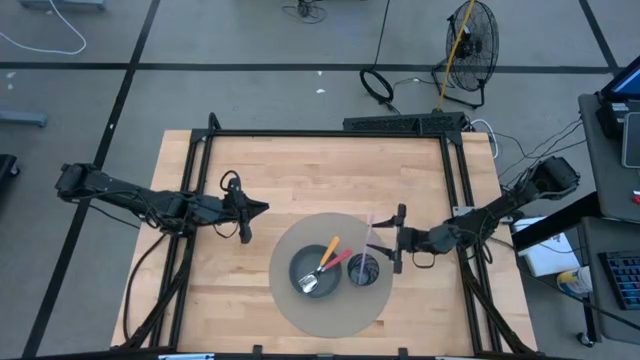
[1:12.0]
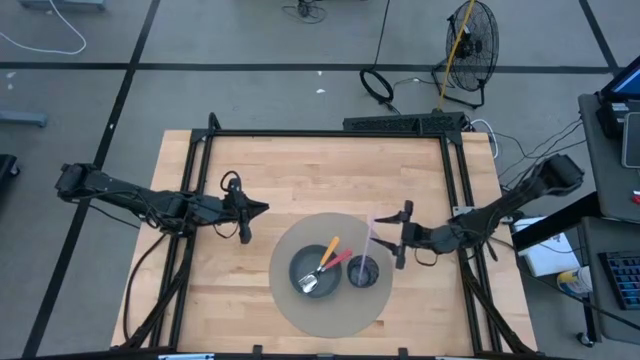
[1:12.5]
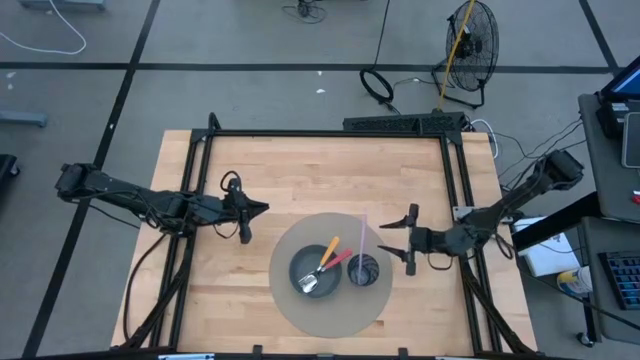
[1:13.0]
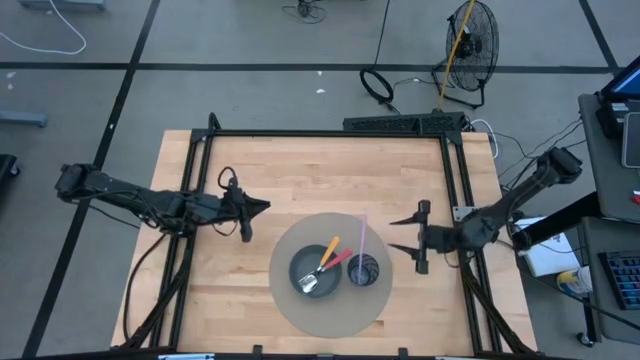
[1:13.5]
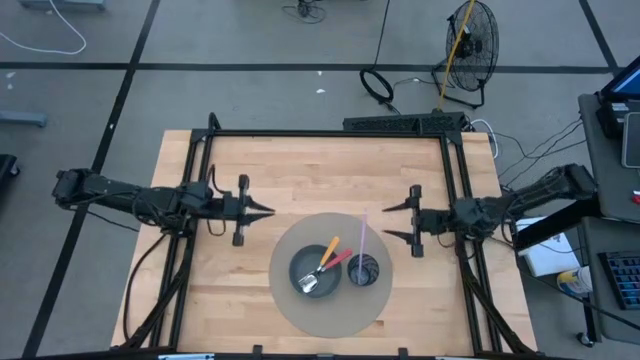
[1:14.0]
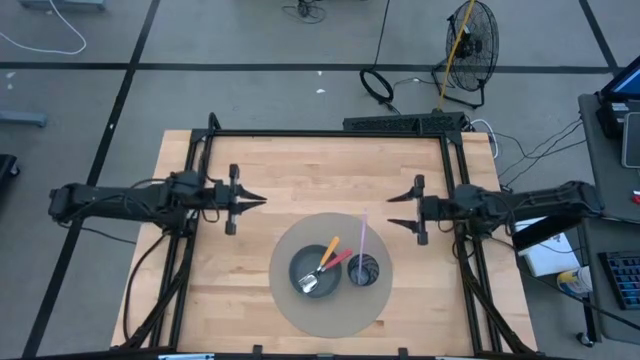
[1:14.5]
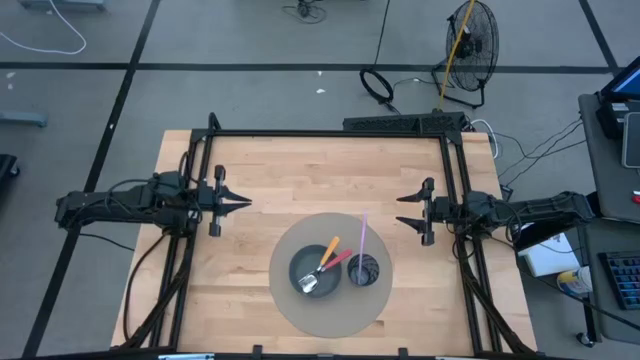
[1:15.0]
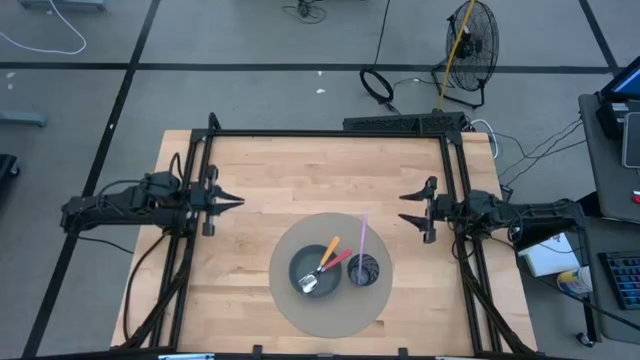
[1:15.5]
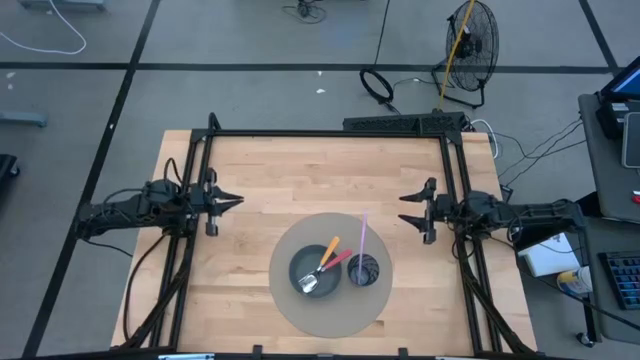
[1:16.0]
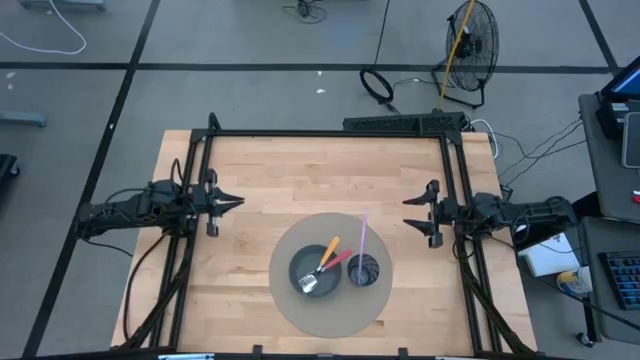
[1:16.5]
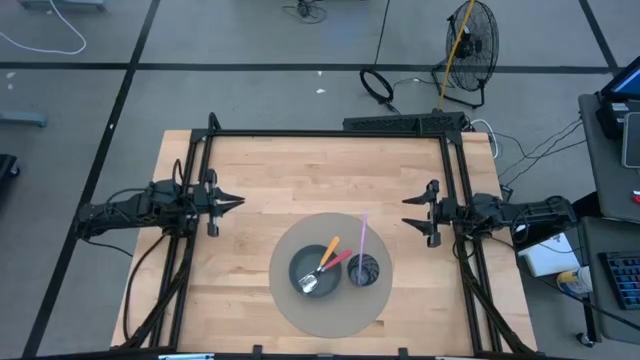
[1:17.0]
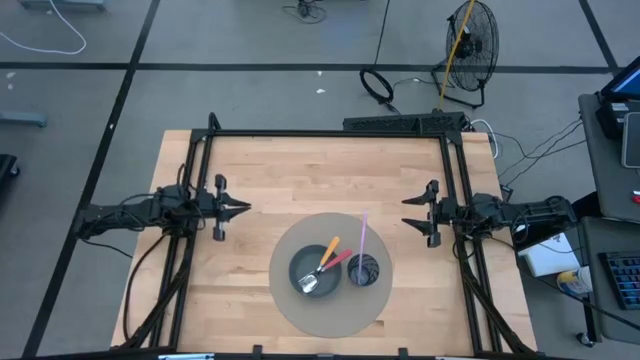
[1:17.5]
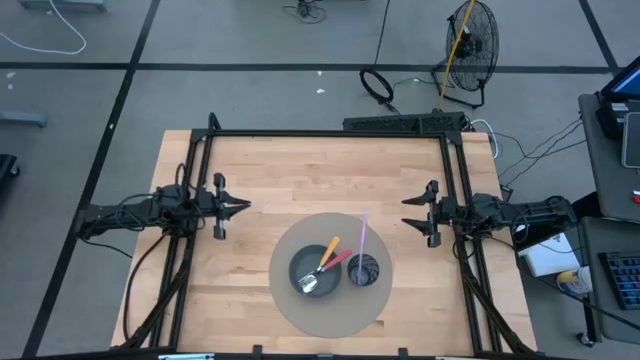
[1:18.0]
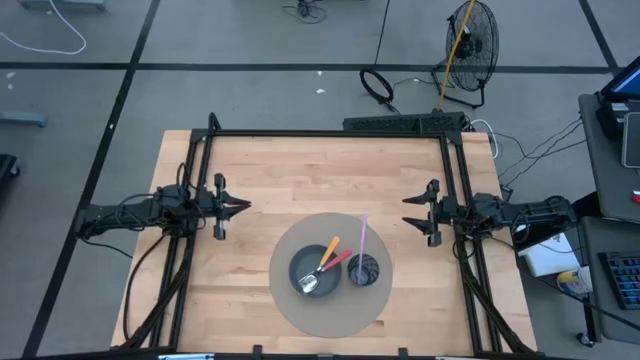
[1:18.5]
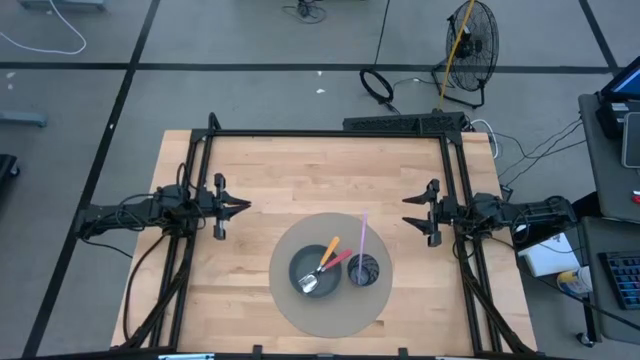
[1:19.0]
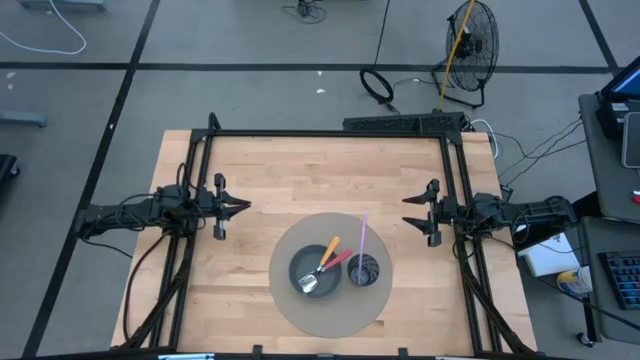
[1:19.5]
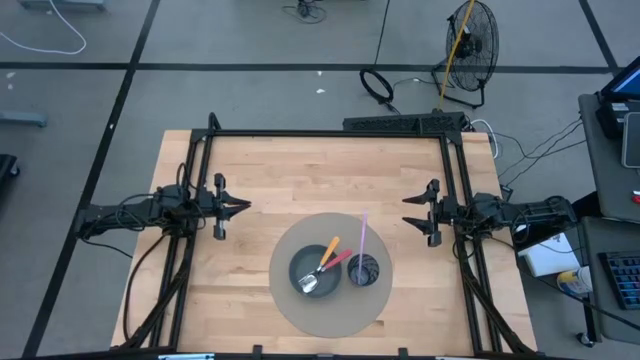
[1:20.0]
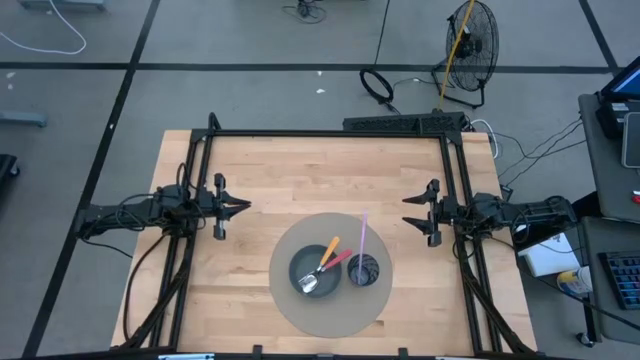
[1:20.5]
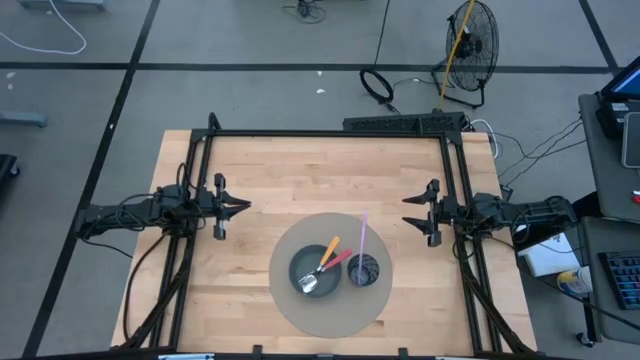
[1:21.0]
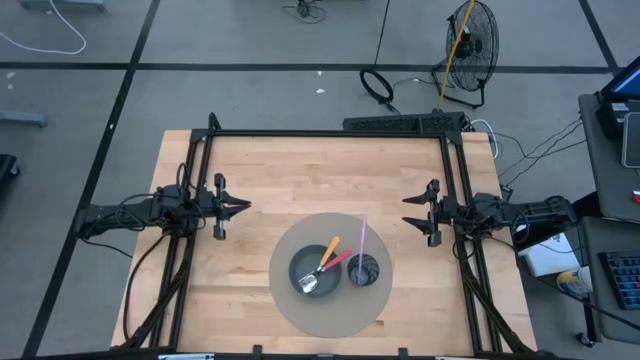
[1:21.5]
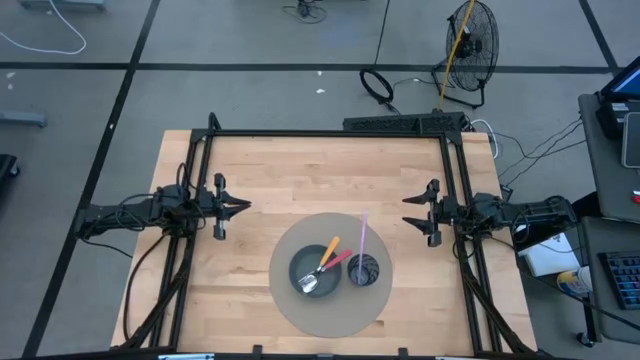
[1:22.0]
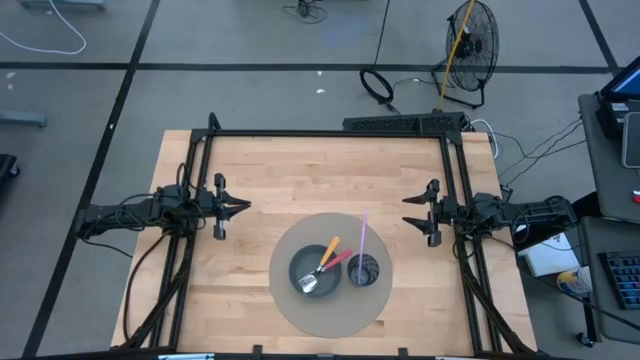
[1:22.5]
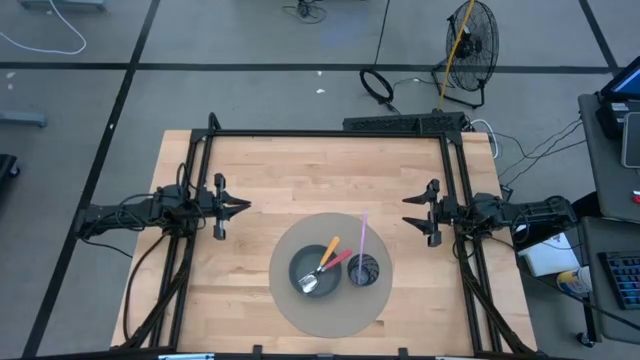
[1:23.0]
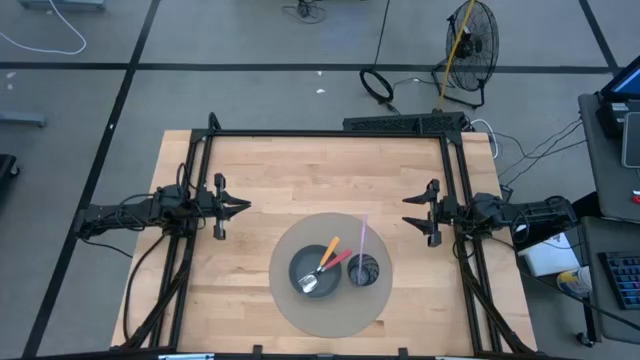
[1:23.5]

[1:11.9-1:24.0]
Task: Pick & Place Utensil
Return to Home Position

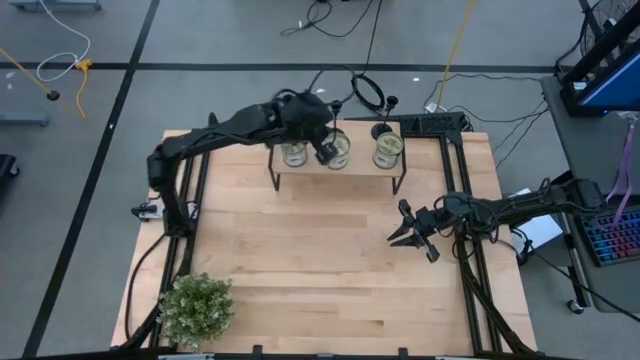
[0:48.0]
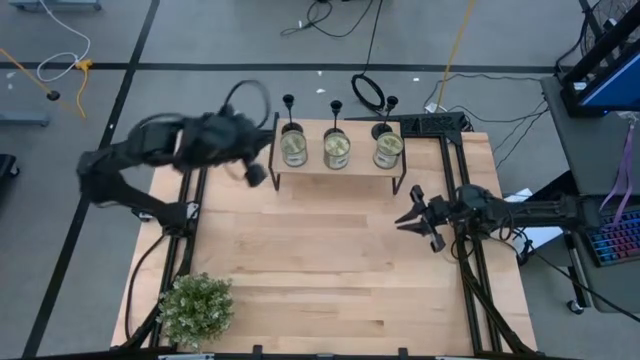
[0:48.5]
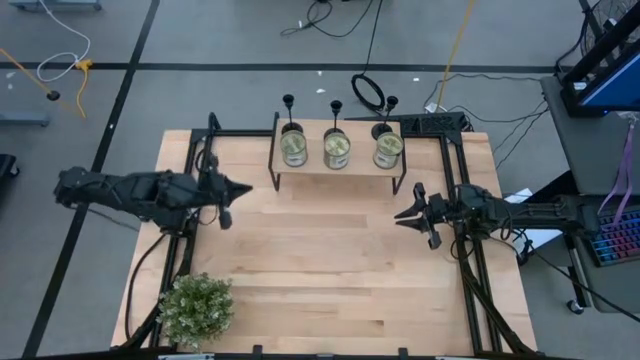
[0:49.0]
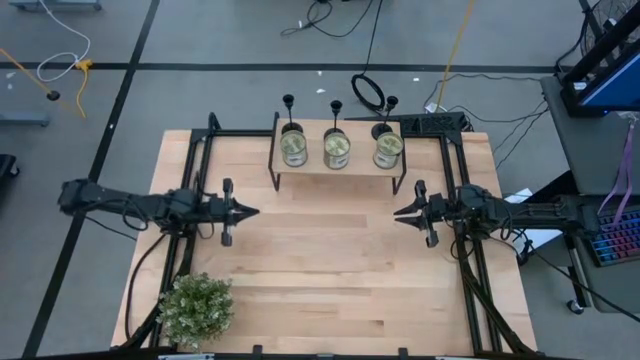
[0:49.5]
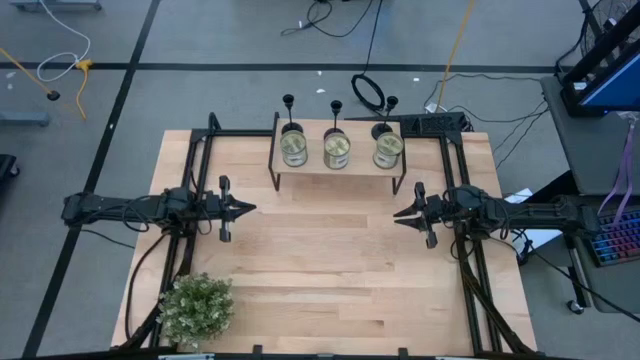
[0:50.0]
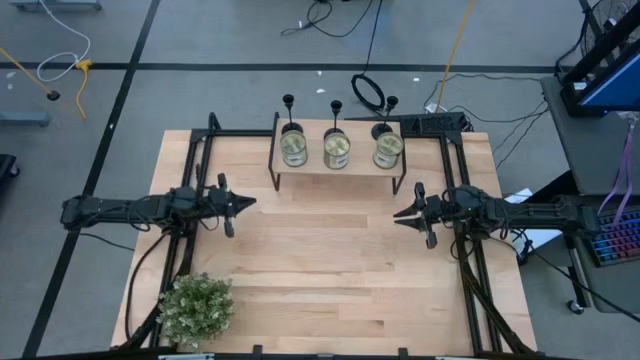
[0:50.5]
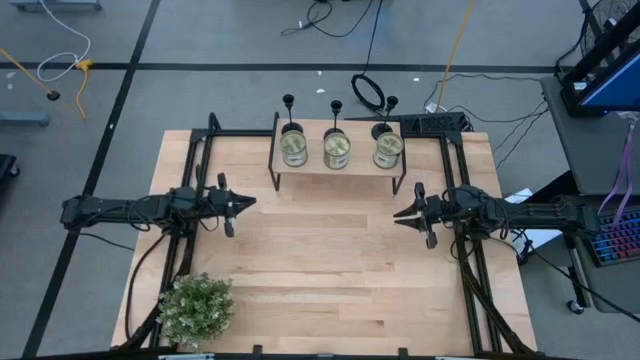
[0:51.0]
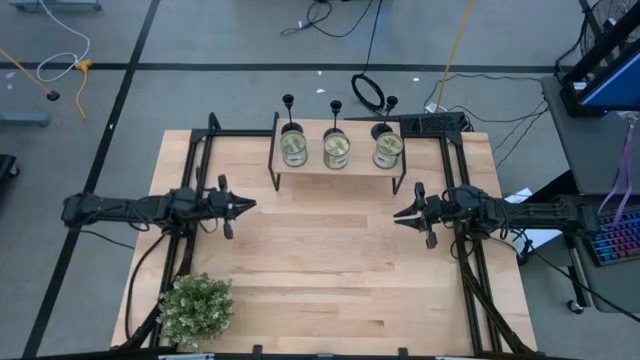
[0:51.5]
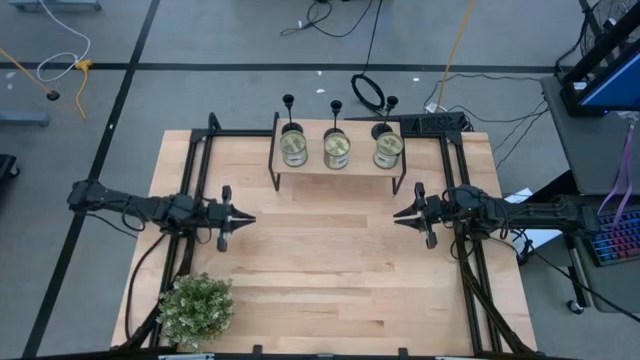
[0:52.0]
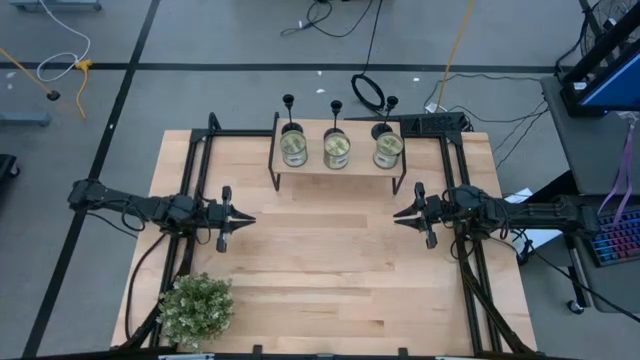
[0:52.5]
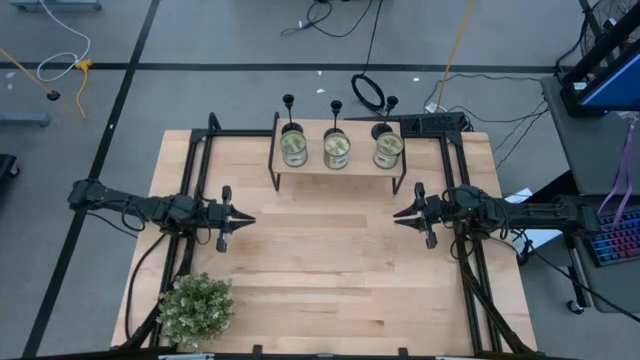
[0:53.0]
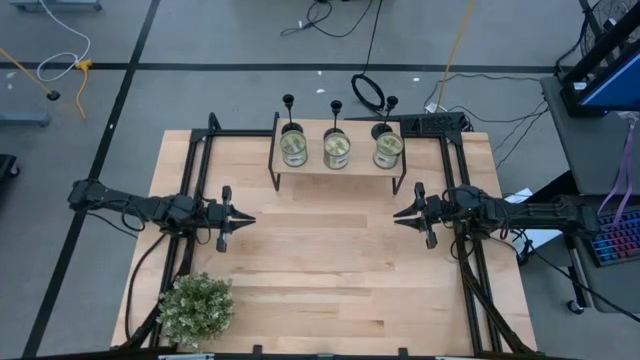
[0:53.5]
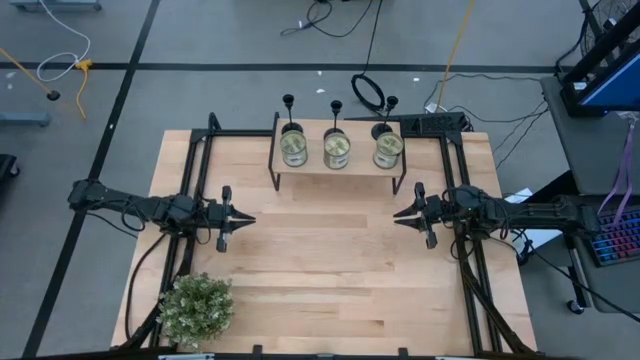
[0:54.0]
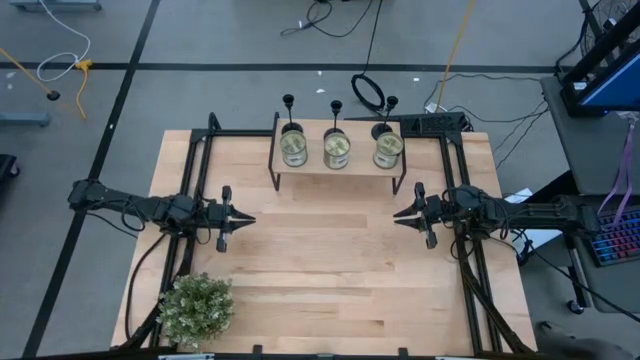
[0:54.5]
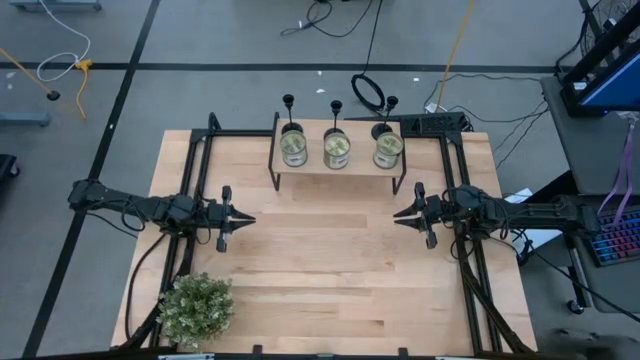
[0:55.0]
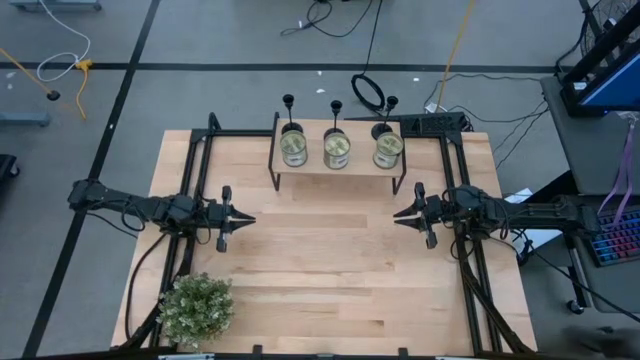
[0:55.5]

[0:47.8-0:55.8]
Task: Pick & Place candle stick holders
Return to Home Position
